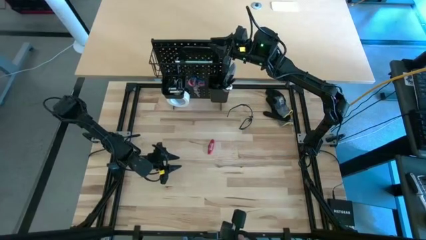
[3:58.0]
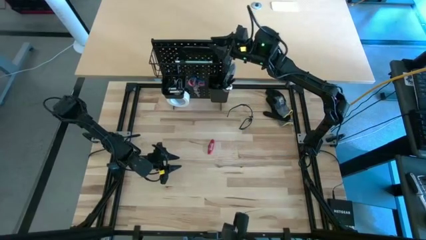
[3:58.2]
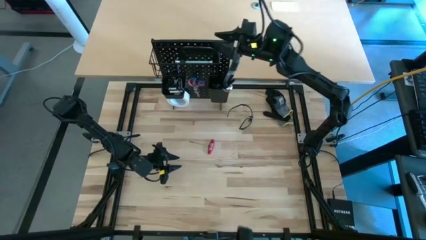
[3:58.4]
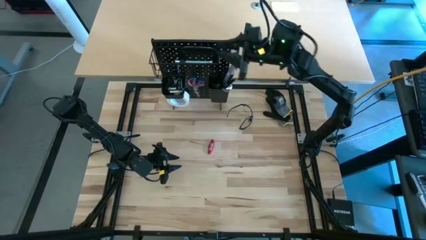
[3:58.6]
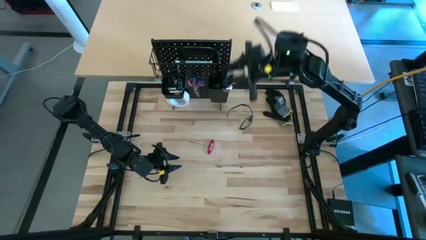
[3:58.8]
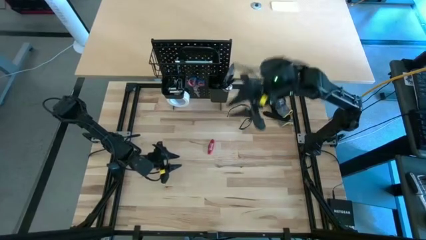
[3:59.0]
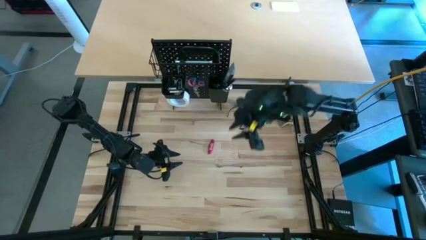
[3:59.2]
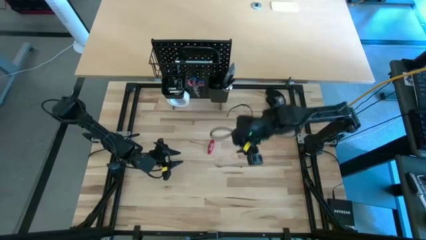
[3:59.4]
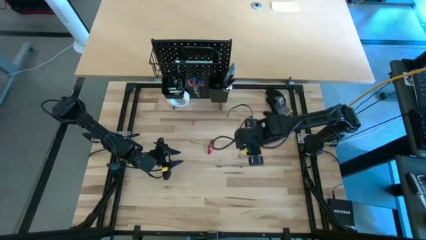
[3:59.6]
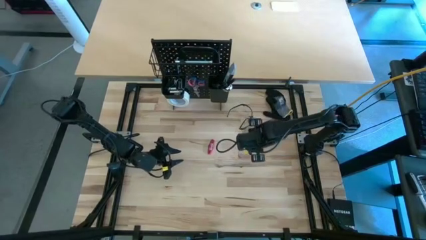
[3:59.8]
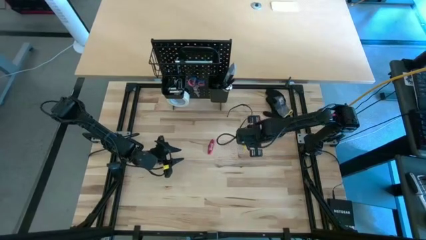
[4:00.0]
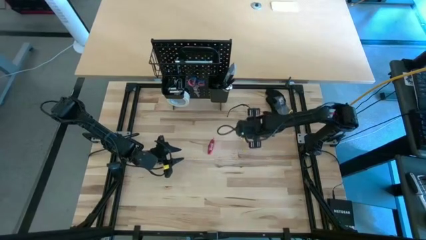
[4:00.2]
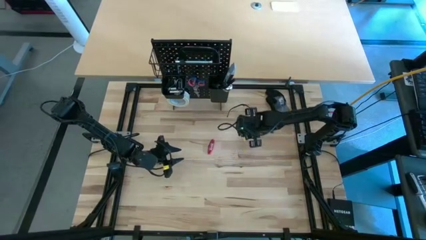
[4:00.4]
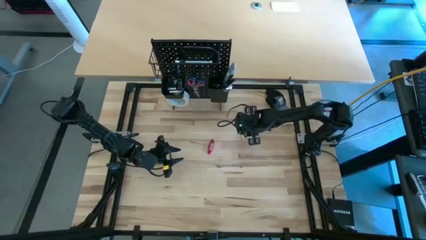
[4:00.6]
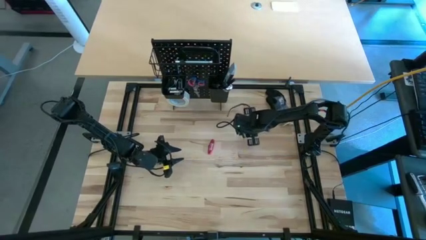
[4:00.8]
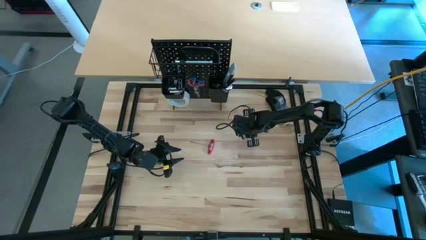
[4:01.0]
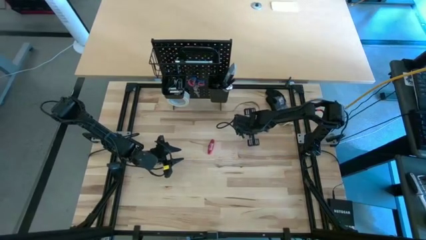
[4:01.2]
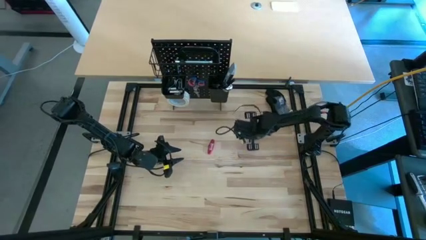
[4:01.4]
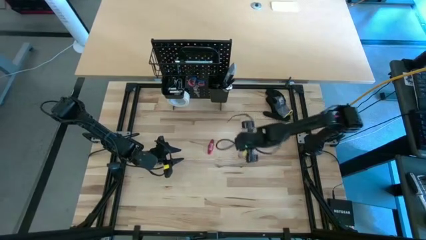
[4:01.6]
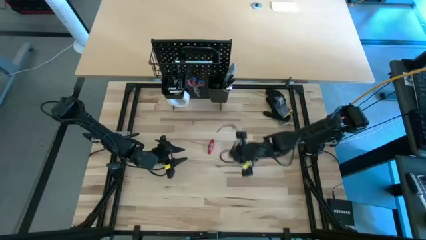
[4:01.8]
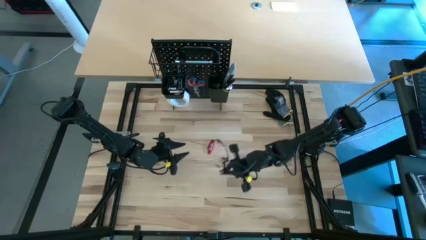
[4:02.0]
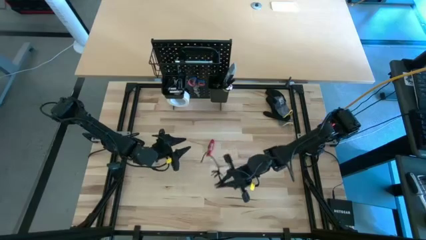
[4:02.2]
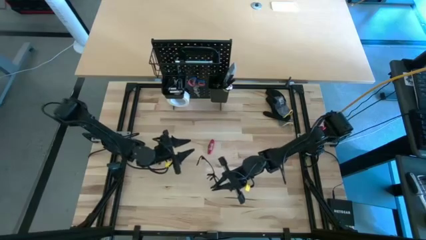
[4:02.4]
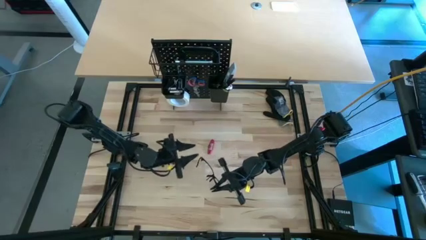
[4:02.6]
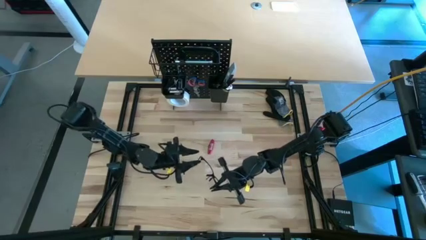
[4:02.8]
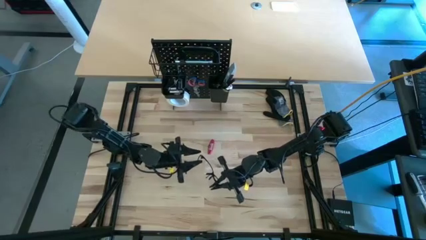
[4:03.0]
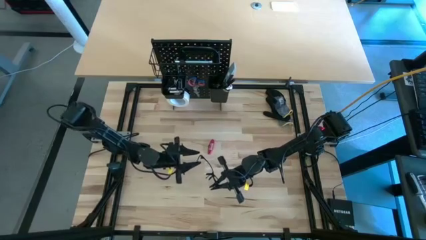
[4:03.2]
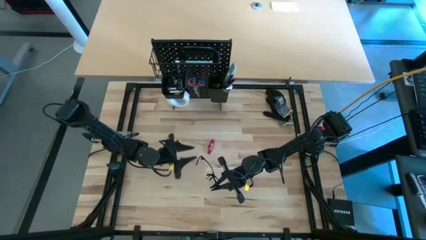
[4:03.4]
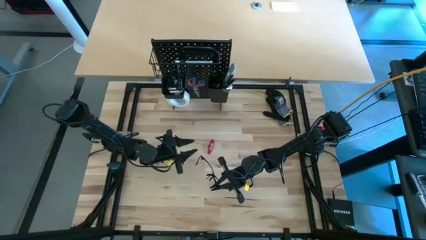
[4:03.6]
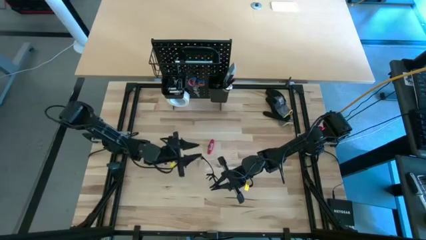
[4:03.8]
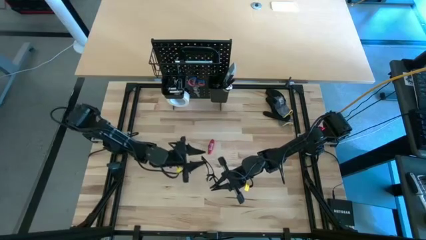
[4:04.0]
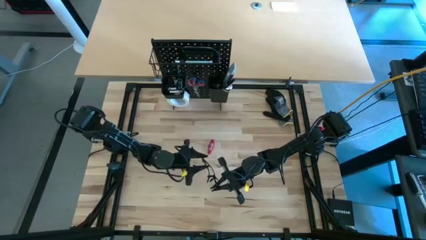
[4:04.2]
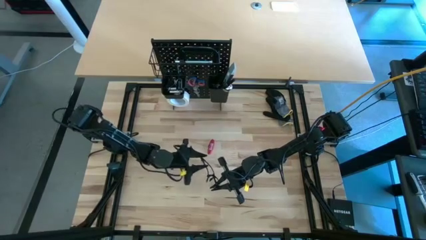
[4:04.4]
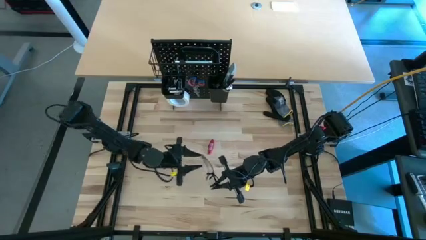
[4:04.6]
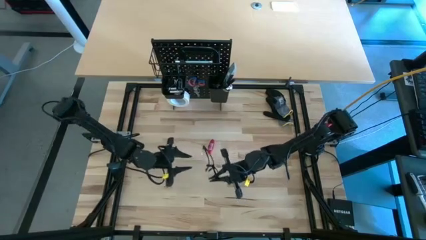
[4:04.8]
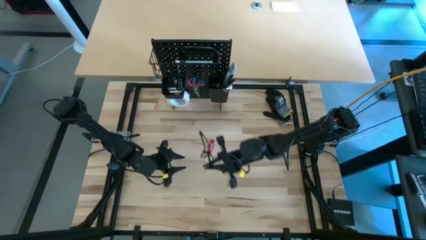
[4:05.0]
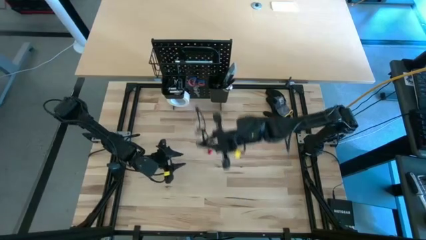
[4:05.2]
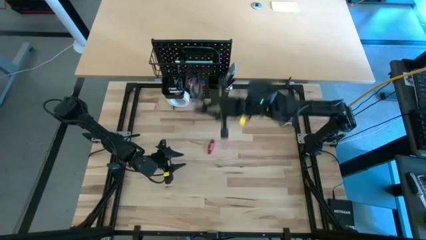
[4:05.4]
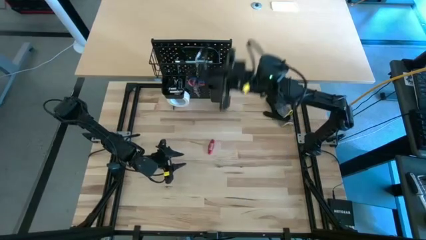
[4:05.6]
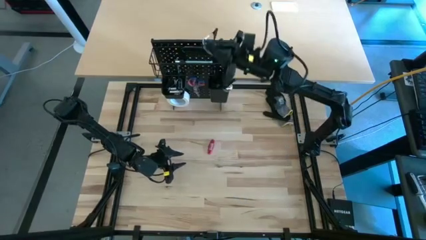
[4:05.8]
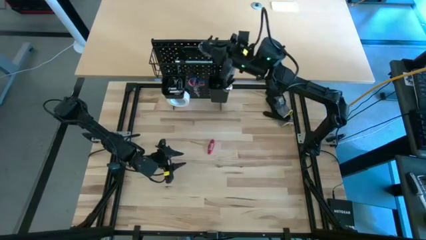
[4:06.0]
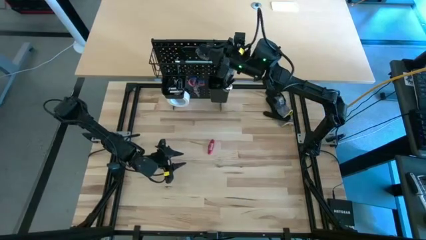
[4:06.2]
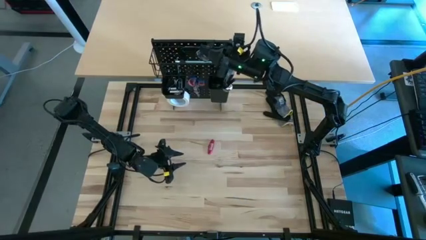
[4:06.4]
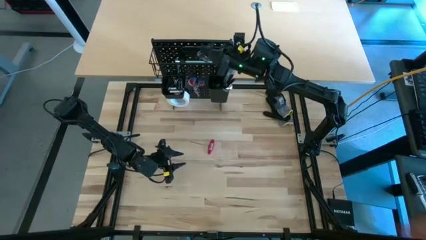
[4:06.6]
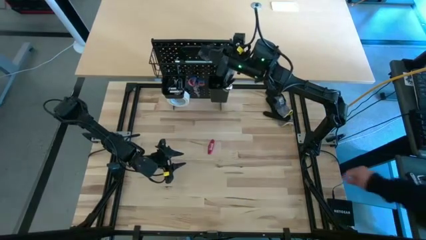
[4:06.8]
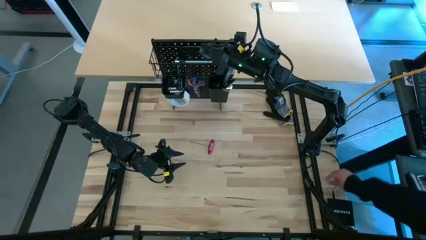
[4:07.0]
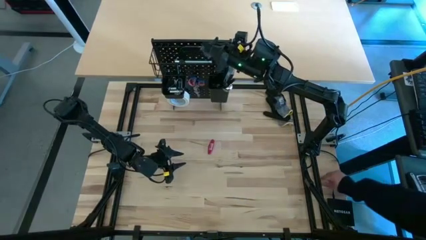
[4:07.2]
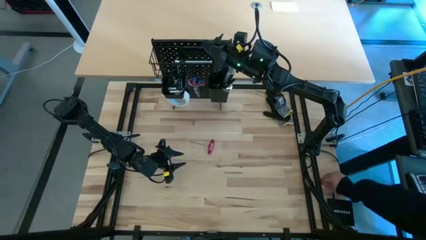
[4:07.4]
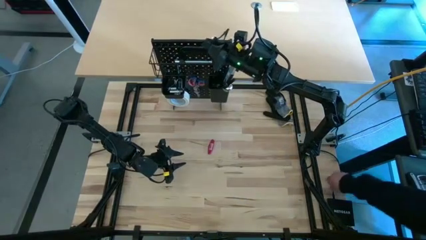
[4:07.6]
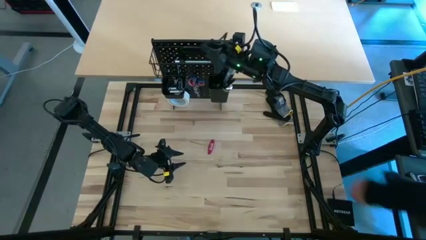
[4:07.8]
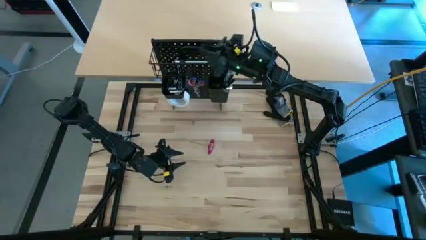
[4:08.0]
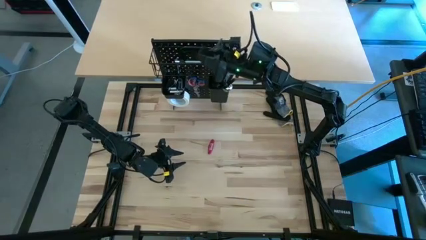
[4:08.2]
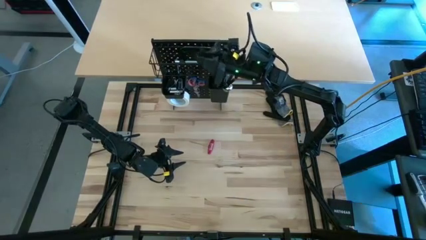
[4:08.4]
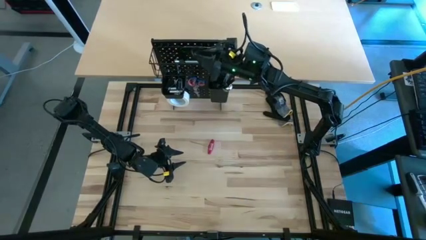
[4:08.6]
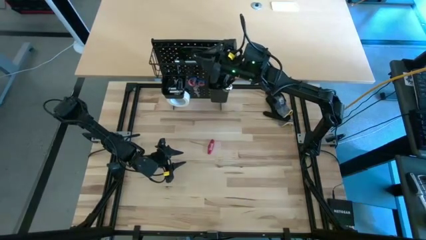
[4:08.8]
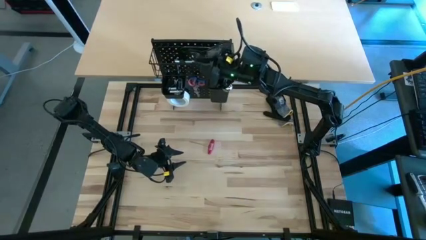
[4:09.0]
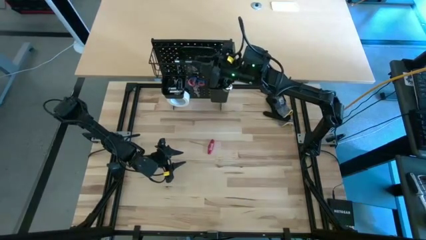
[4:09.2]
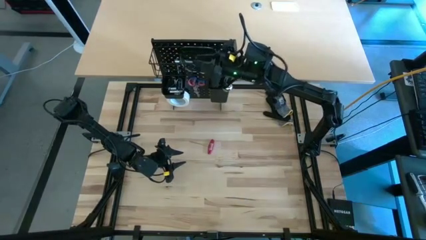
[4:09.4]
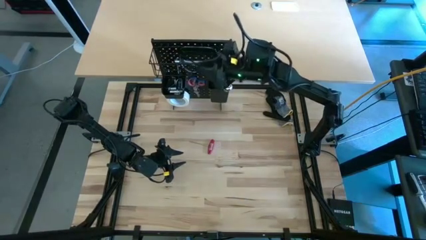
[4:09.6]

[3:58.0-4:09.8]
Task: Hang tools onto peg board
Put the transparent safety glasses into the black basket on the peg board

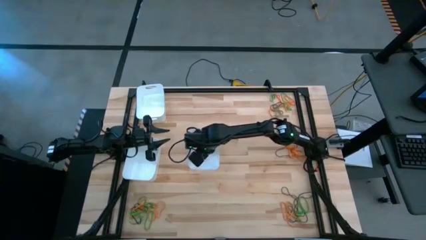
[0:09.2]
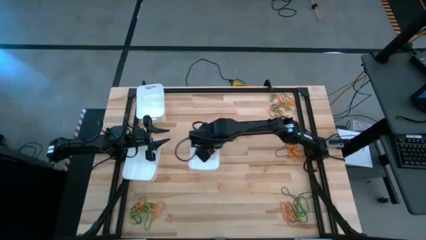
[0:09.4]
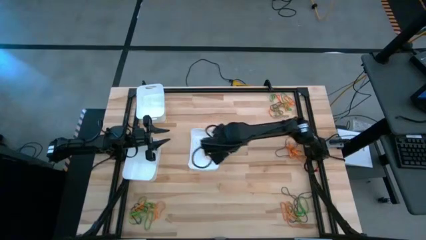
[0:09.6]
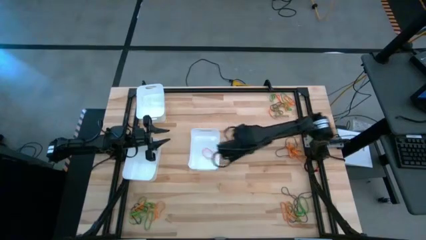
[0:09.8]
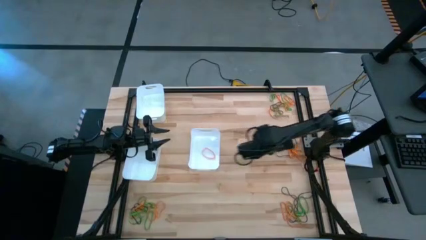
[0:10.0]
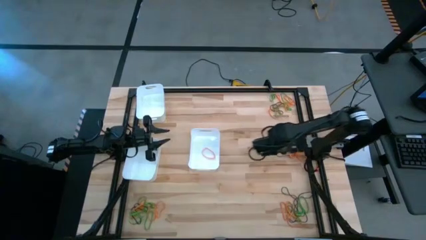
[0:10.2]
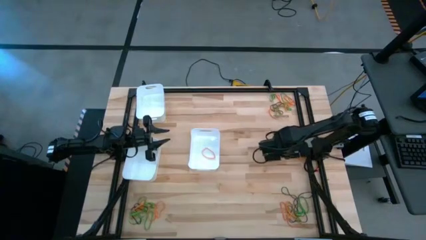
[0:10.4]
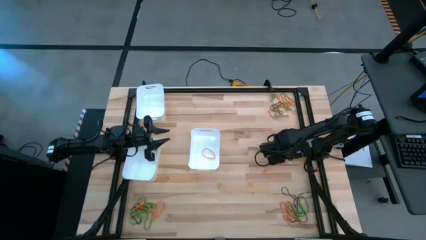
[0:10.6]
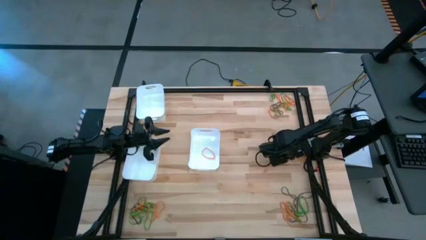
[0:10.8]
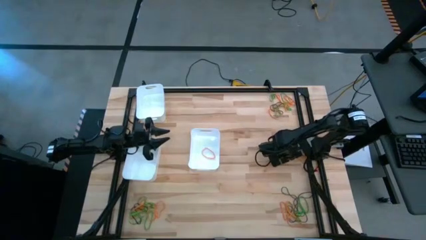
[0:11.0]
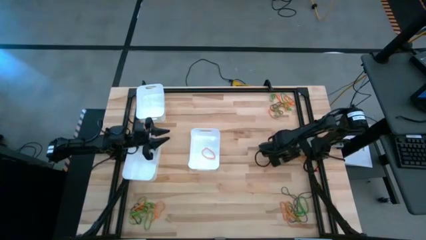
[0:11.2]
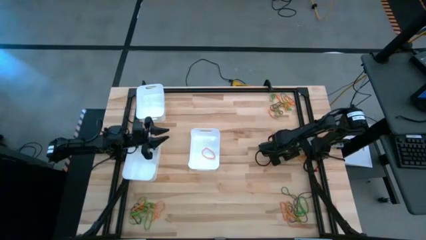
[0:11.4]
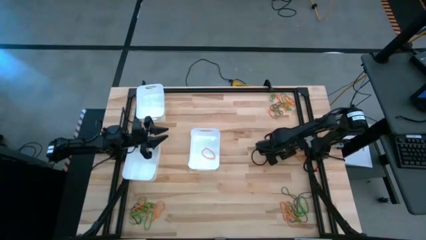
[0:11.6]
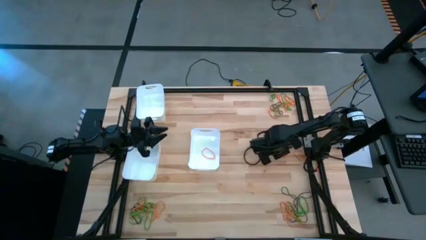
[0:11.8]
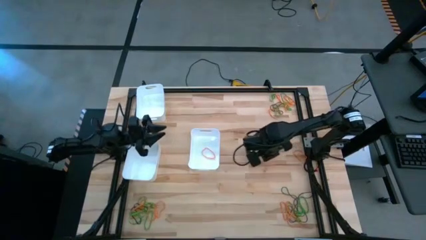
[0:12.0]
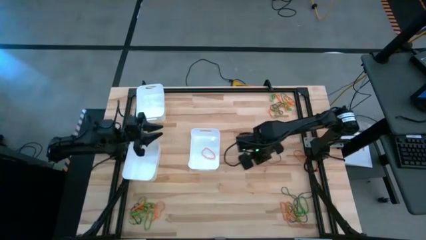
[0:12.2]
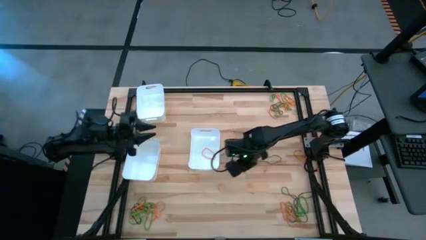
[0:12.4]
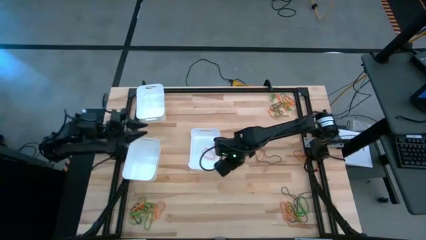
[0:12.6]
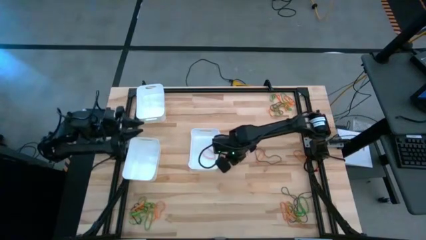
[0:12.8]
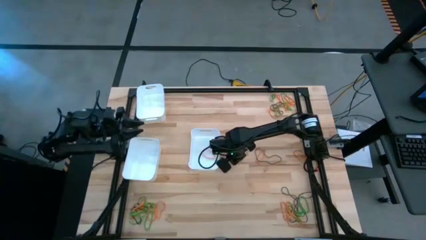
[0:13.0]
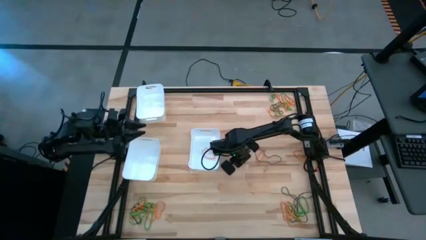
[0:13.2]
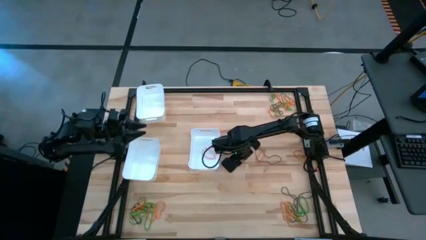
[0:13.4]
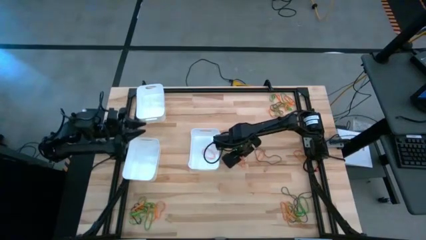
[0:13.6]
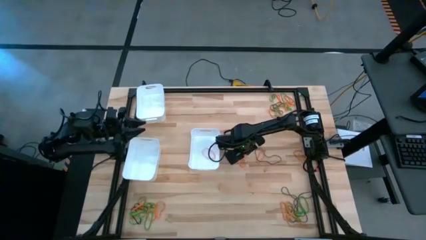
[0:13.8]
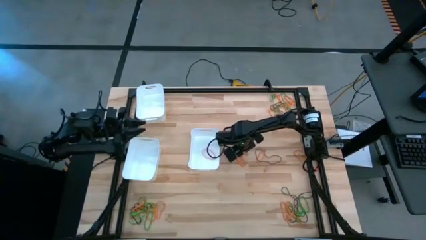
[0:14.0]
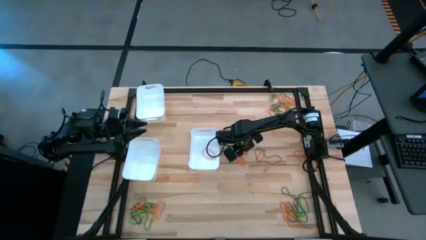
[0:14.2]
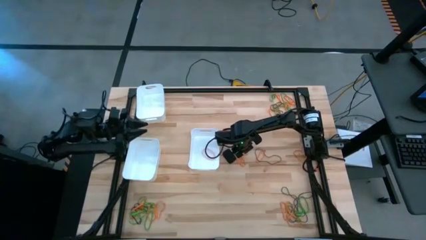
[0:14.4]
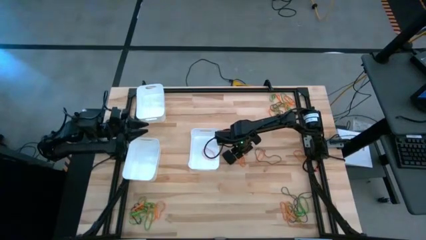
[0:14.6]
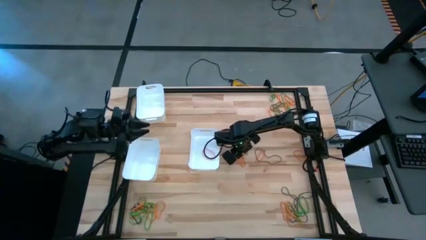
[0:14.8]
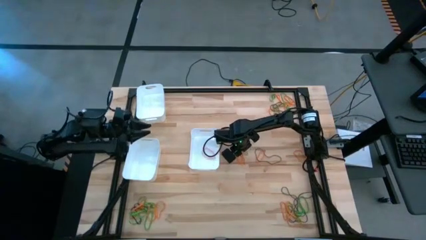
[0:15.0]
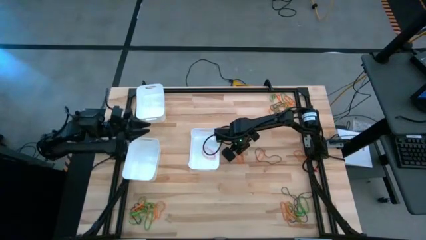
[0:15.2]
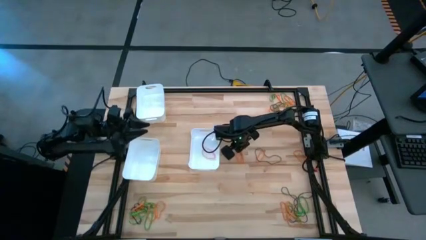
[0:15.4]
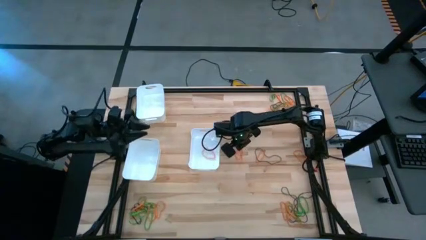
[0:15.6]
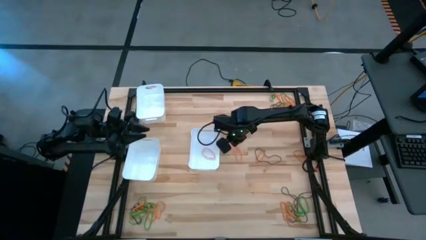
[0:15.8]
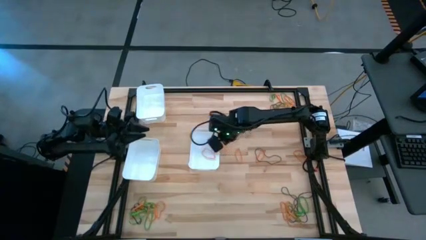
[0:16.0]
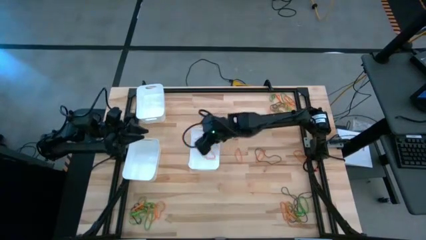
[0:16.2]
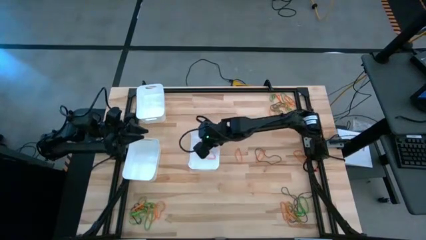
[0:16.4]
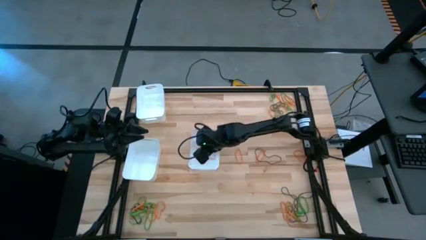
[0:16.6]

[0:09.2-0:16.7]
Task: Sort rubber bands into baskets
Put the orange rubber band into the bottom right white bin
